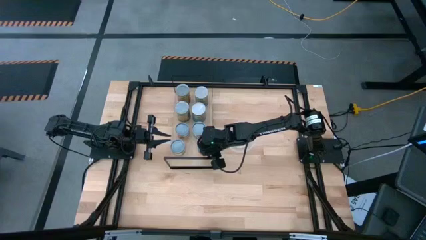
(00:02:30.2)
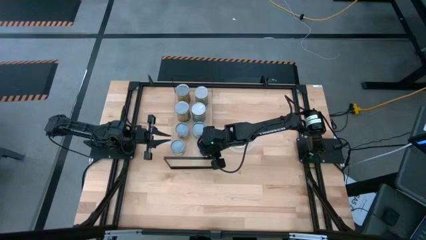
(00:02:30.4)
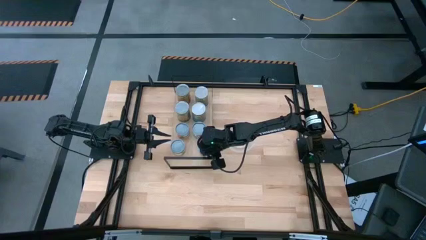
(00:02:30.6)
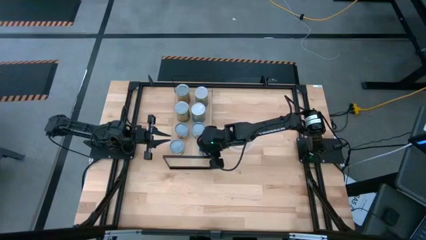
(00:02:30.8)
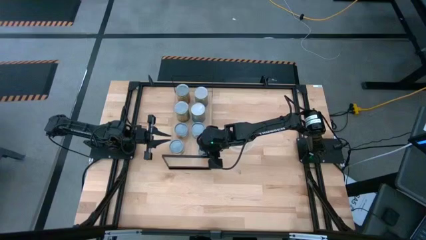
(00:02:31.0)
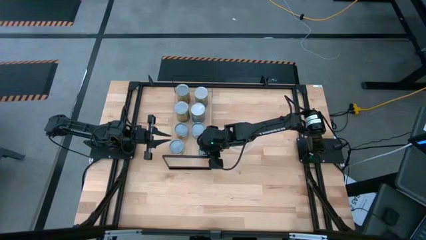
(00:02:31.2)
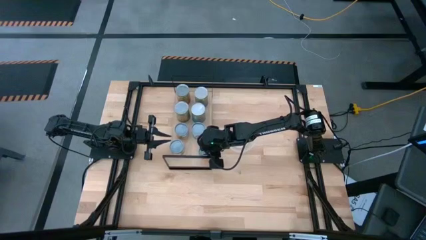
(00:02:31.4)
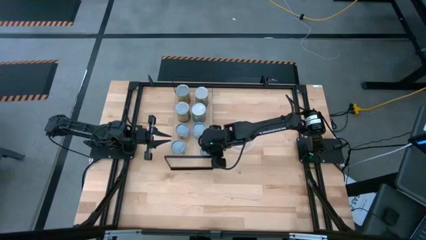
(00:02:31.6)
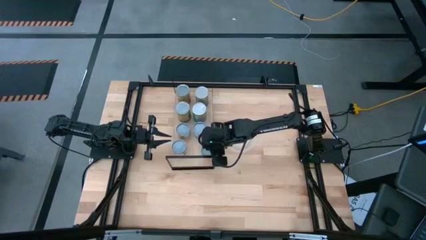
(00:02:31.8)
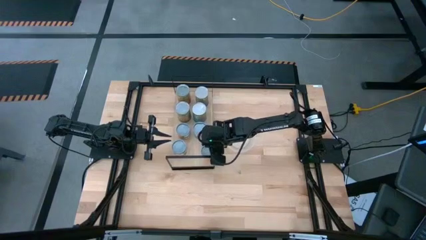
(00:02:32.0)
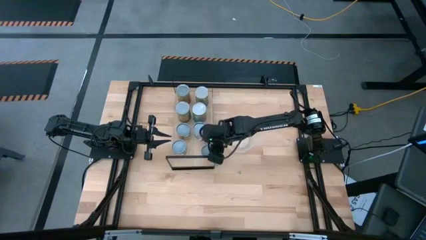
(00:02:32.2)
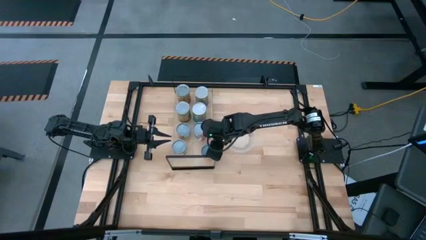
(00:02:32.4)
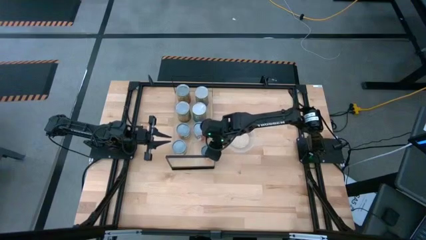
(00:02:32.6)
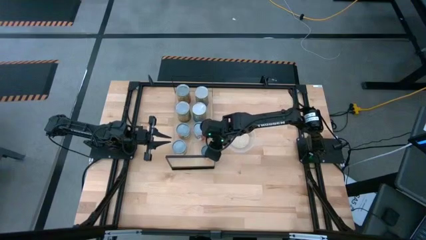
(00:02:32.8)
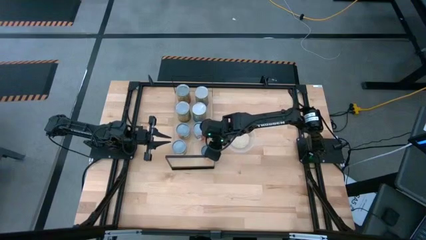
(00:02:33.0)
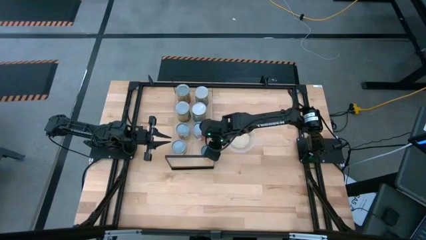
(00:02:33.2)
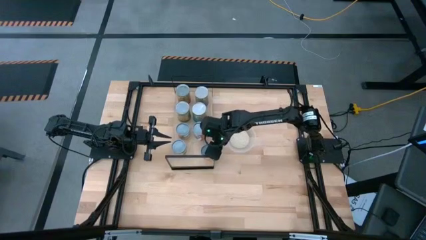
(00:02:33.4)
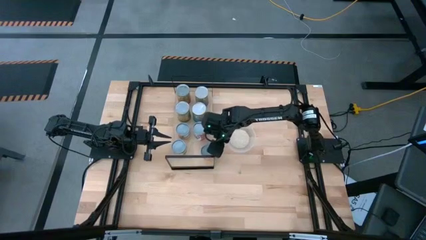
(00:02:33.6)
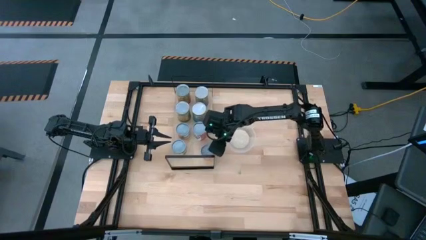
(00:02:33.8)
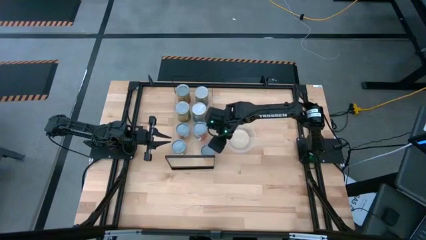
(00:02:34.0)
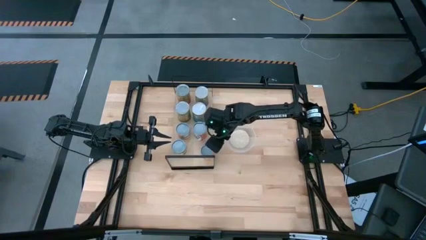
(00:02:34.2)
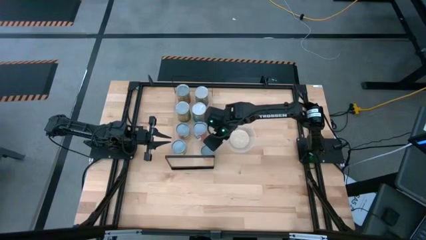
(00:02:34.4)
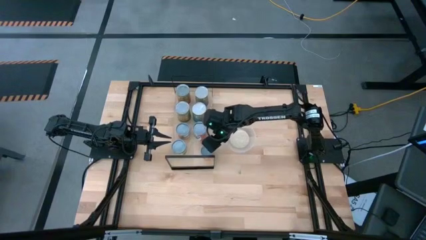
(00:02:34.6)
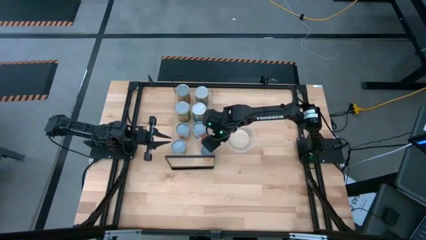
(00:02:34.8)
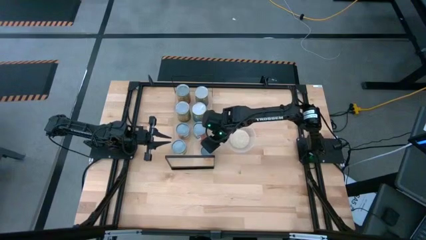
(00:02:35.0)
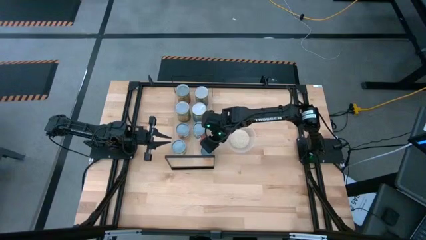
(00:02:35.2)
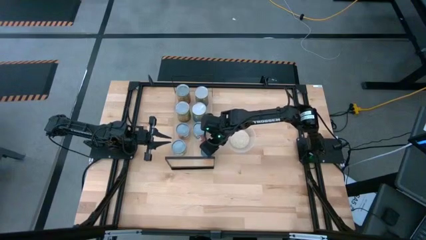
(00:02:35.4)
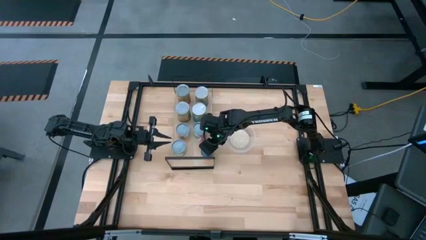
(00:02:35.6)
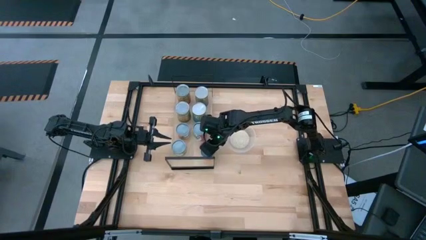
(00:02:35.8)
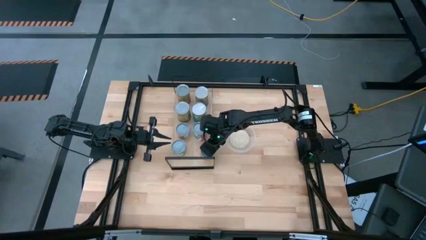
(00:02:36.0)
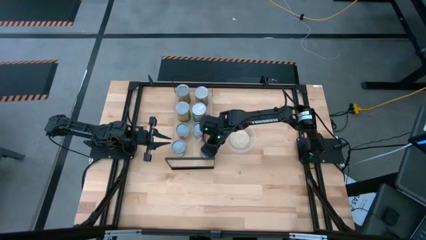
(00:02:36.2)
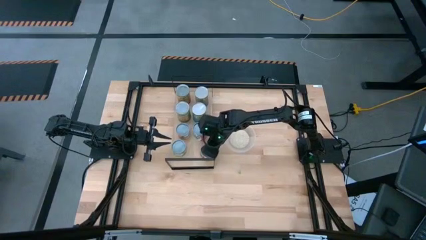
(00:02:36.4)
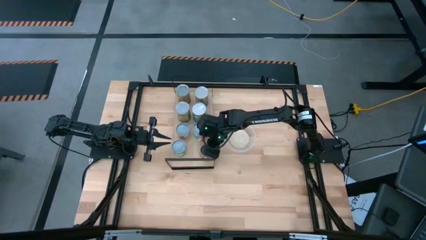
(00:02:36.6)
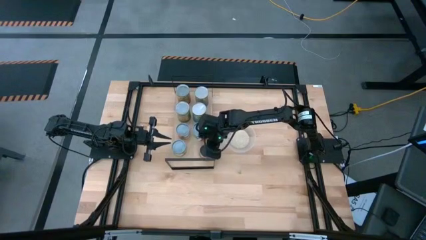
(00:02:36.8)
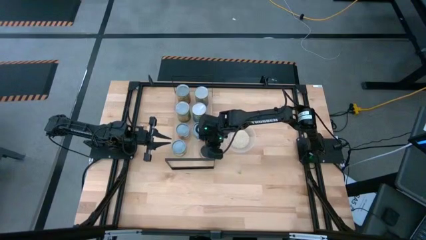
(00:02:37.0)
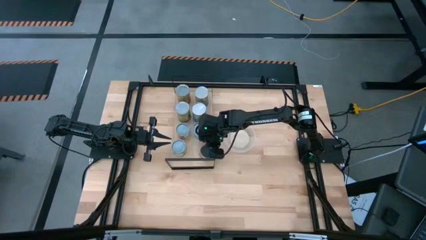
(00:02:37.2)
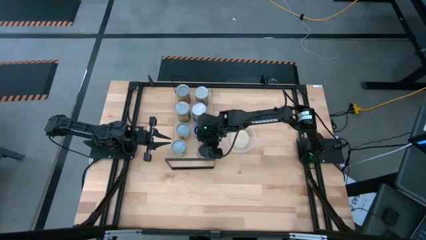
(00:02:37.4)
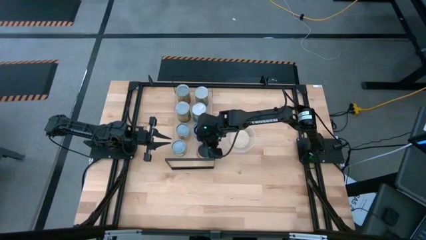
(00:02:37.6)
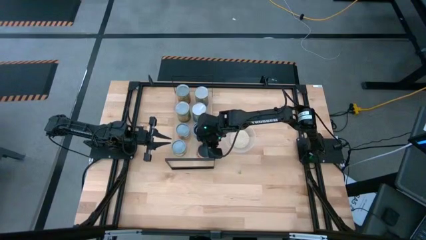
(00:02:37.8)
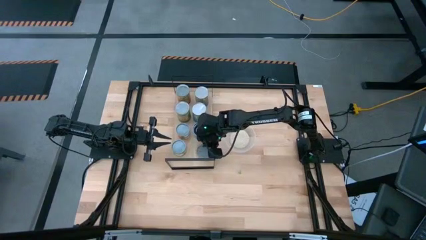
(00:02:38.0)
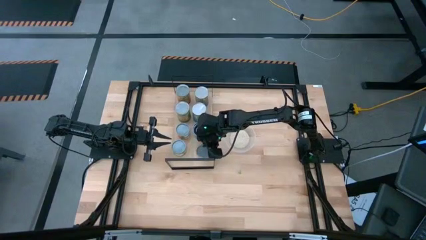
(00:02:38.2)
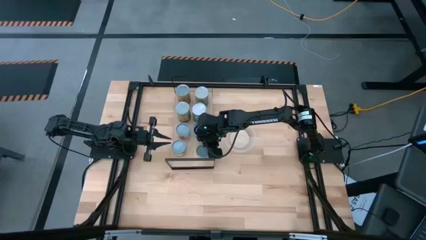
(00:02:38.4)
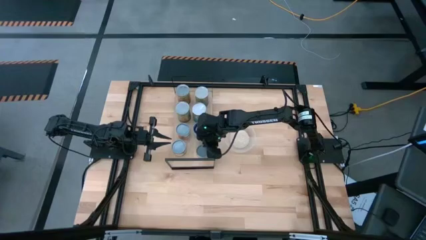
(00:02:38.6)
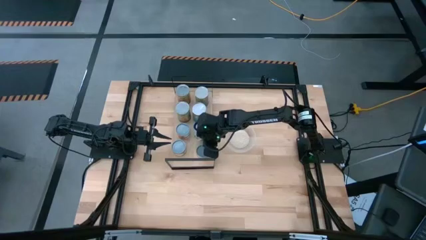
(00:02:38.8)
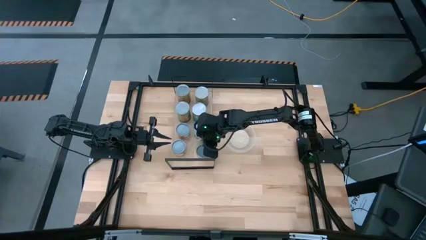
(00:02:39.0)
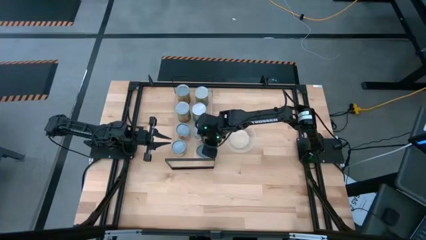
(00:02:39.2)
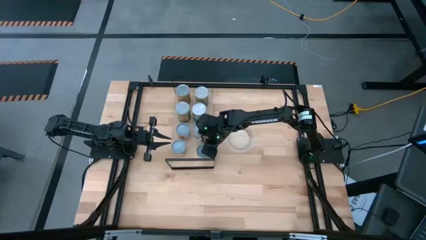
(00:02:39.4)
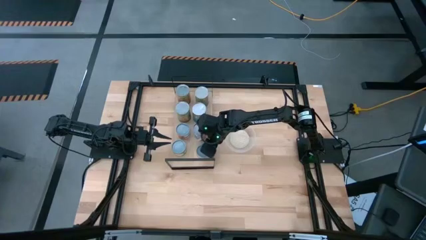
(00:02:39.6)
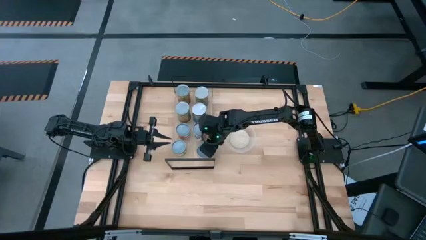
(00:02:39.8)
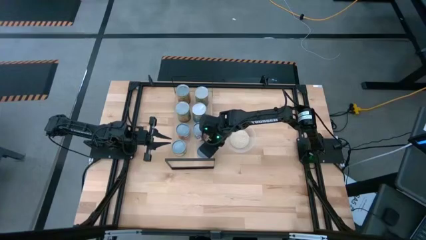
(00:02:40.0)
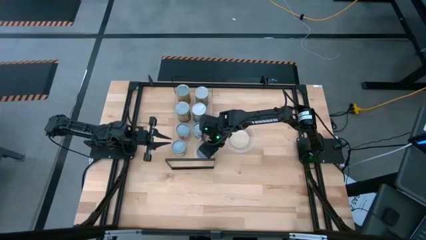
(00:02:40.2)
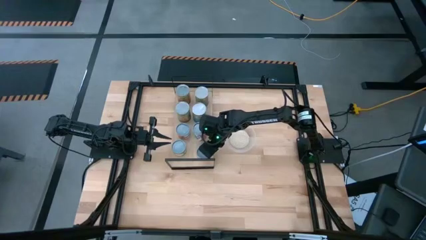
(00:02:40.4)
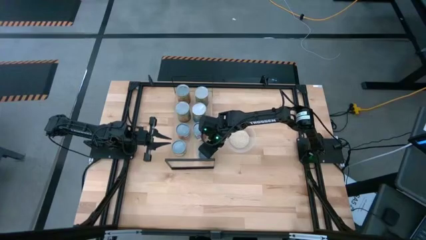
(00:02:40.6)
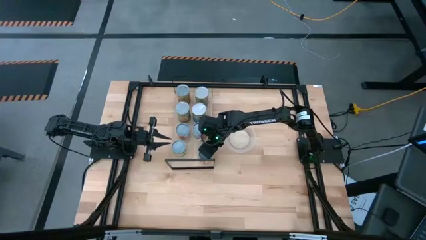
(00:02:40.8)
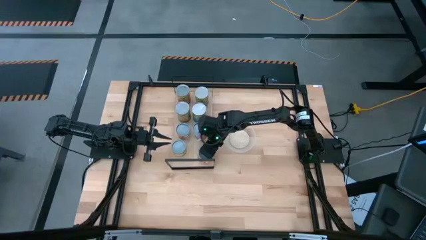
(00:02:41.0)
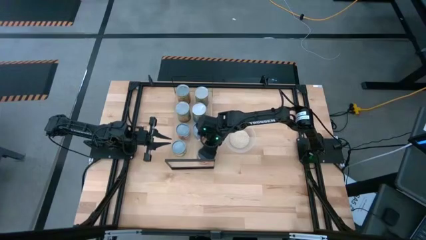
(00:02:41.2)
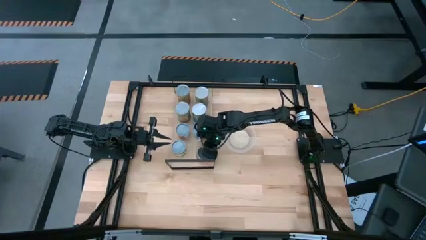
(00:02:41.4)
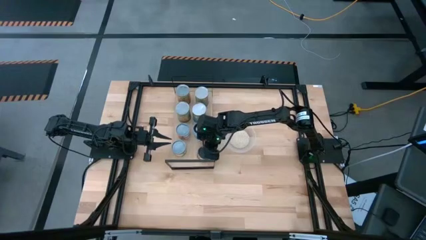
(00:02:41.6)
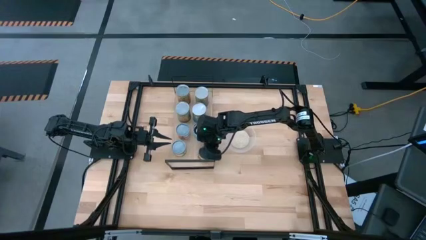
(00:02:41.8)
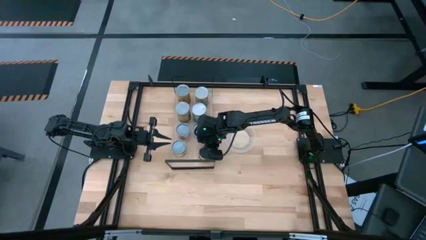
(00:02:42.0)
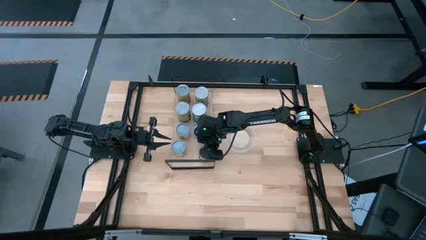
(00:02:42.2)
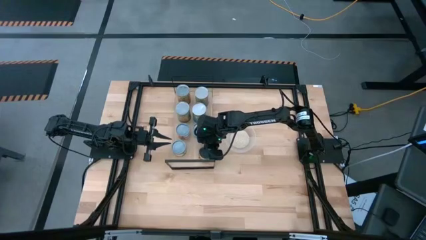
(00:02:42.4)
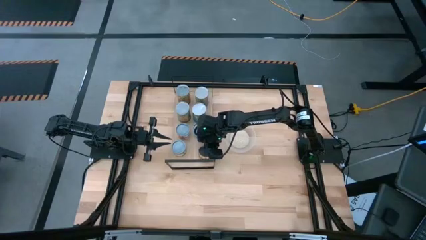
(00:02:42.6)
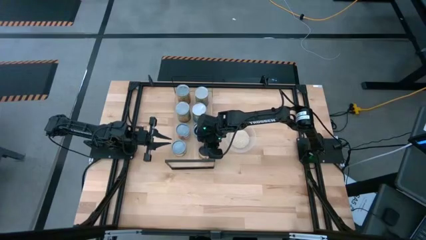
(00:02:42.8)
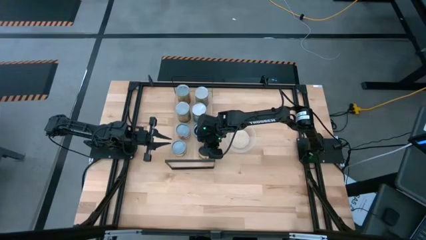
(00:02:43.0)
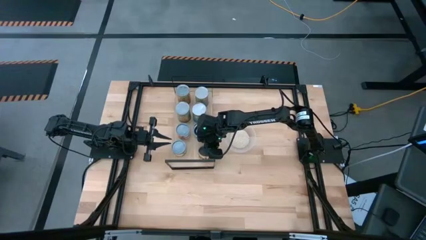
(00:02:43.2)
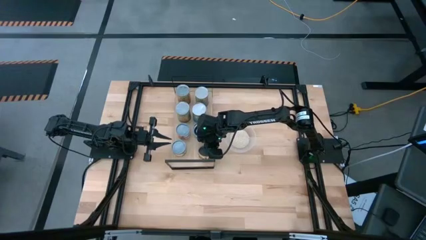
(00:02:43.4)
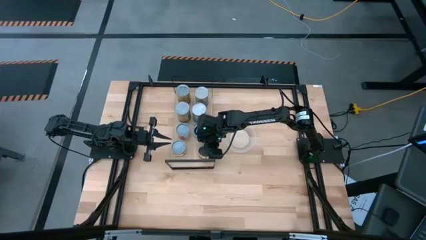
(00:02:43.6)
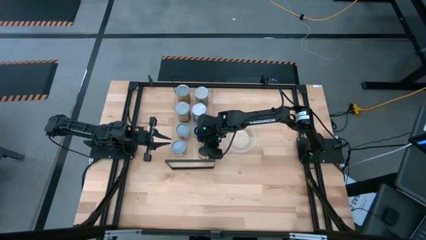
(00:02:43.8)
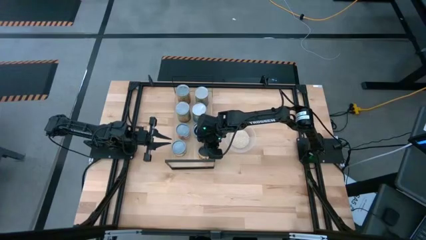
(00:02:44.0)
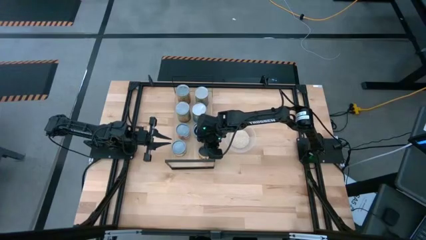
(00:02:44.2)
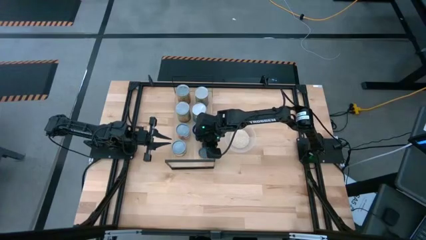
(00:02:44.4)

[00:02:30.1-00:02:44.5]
Task: Pick and place cans onto a shelf
Put the small canned pineapple on the shelf
